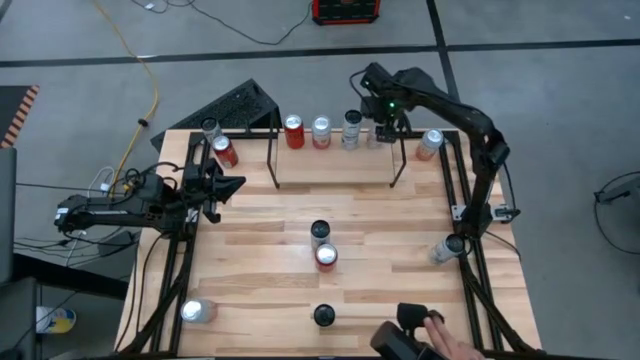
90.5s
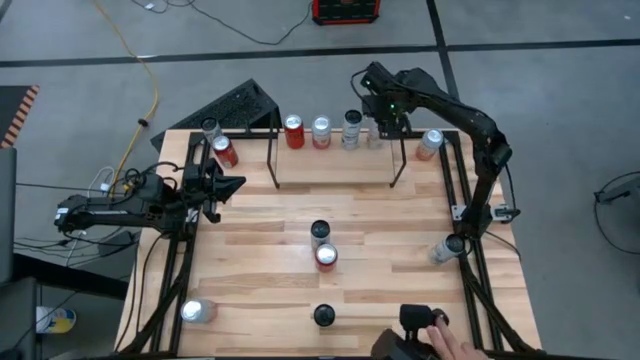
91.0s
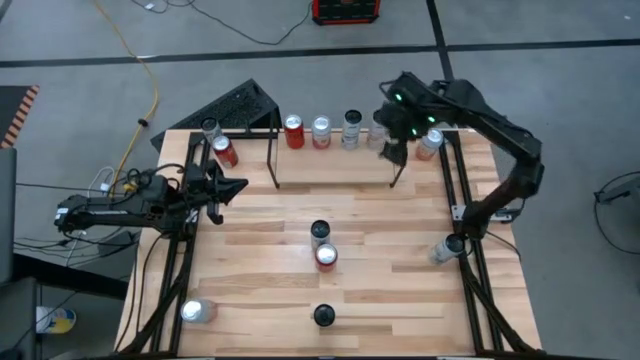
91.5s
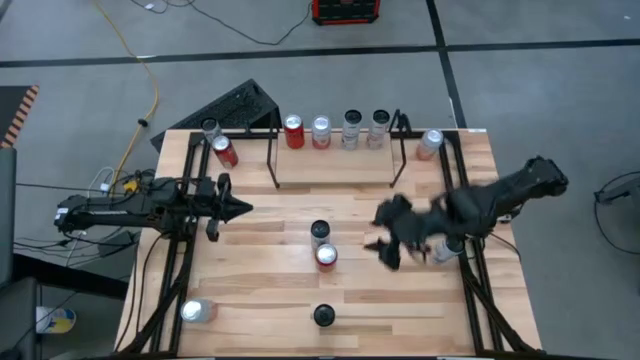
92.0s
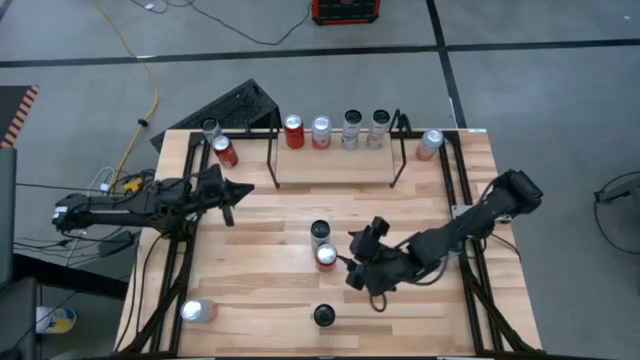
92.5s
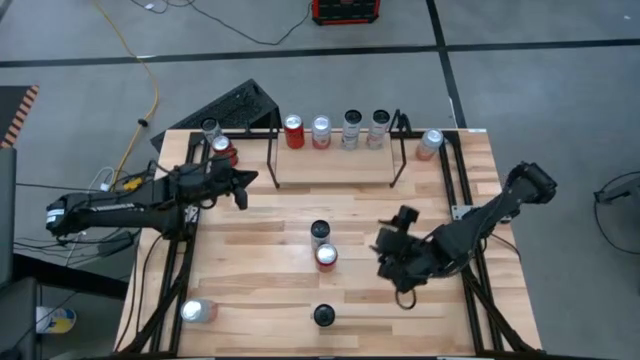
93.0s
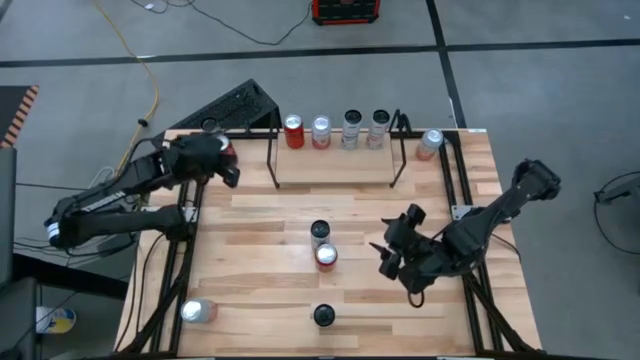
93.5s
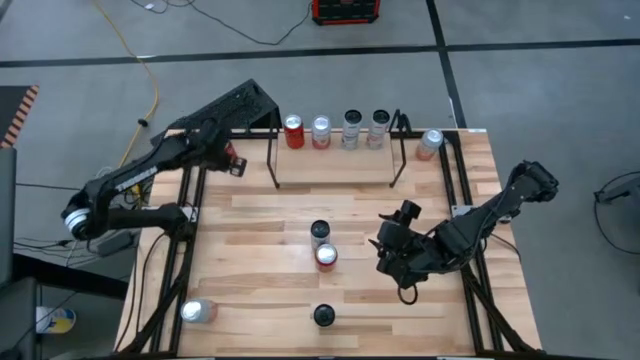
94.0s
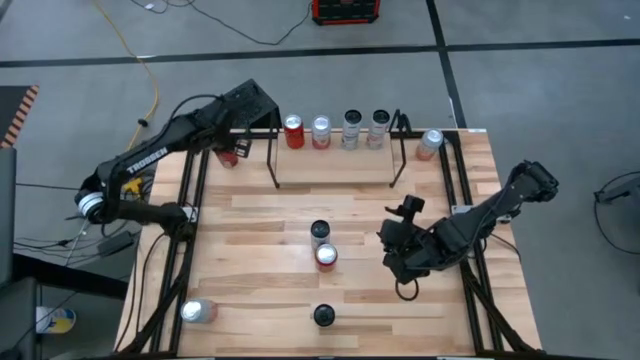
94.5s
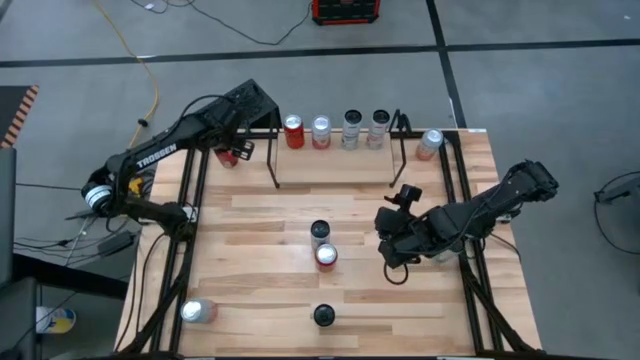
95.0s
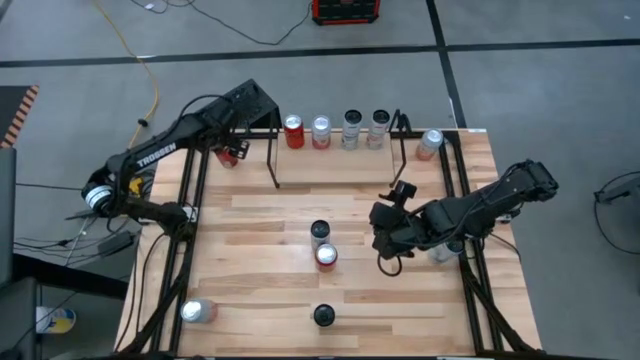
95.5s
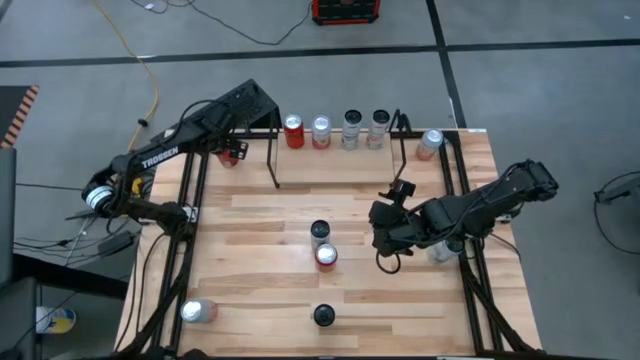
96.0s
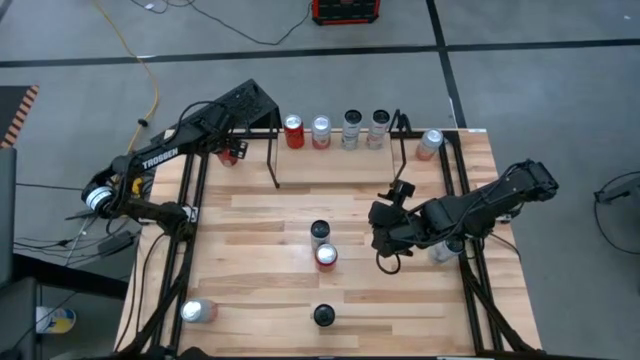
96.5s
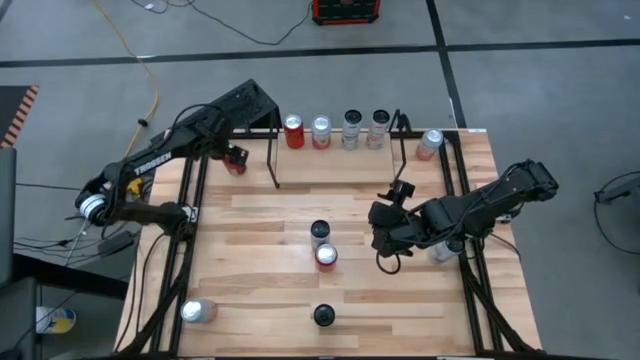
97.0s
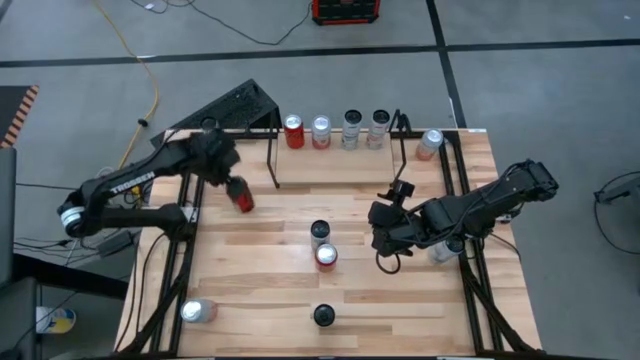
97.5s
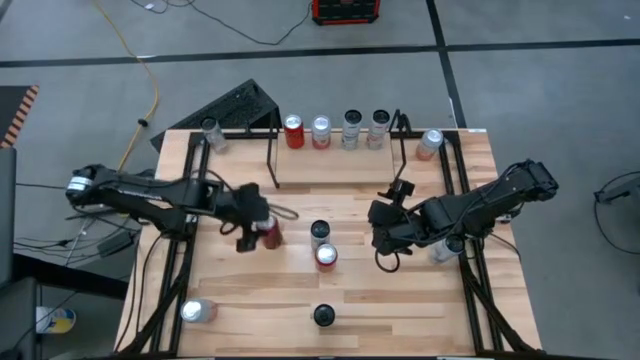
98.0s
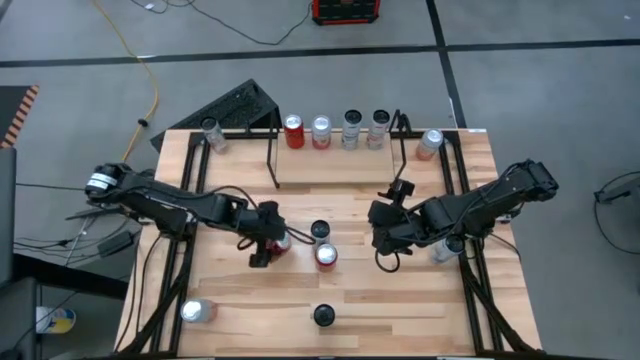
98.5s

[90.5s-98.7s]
Task: Place canned beverage on shelf
Put the top red black soda can on the shelf aligned with the other red black soda can

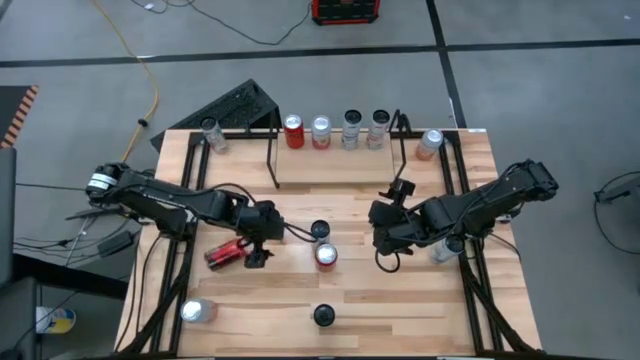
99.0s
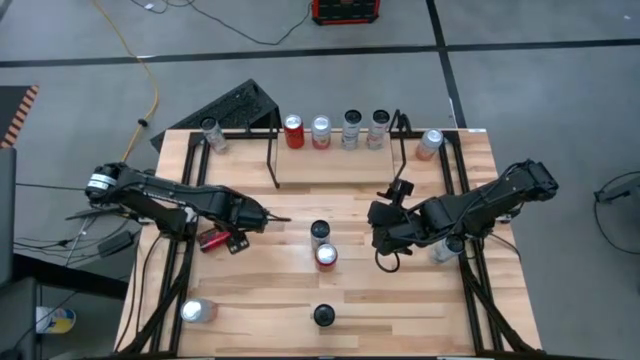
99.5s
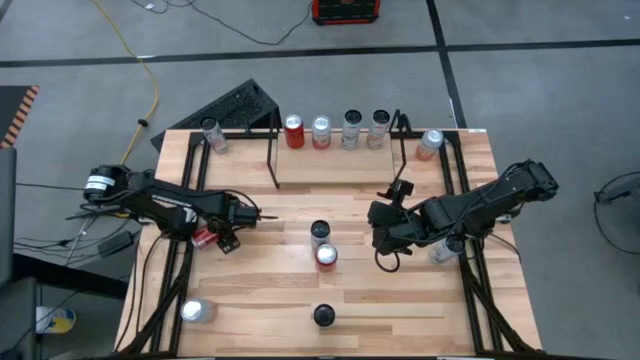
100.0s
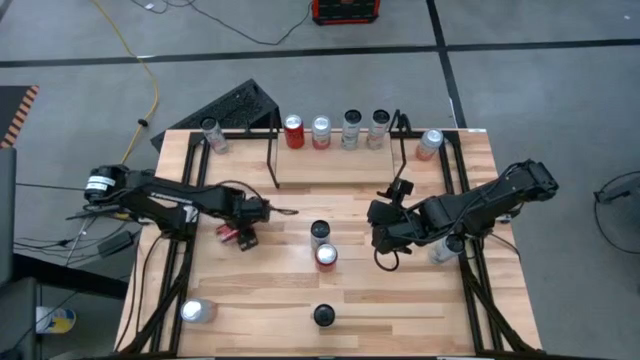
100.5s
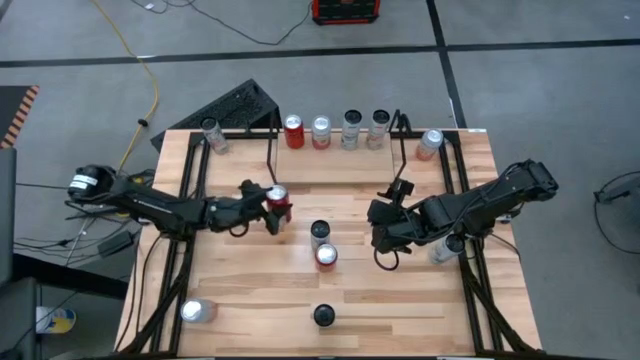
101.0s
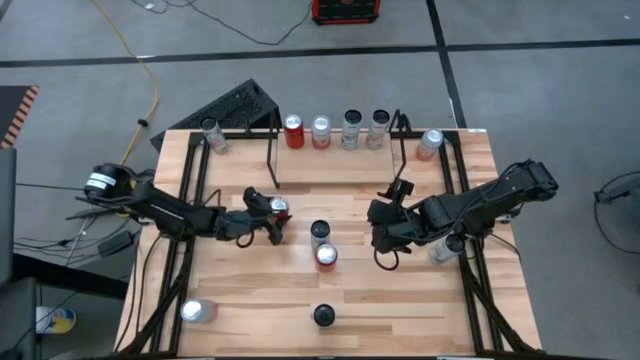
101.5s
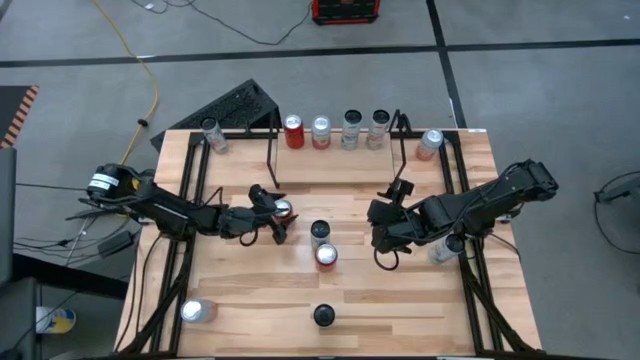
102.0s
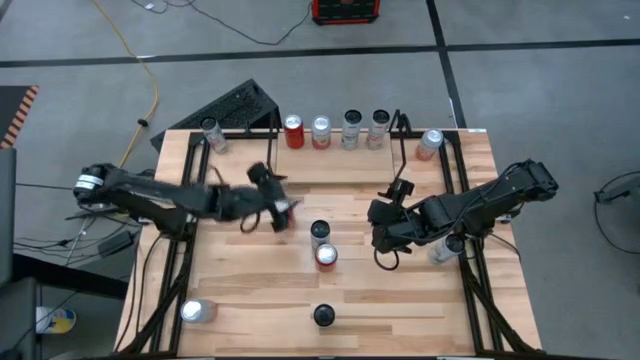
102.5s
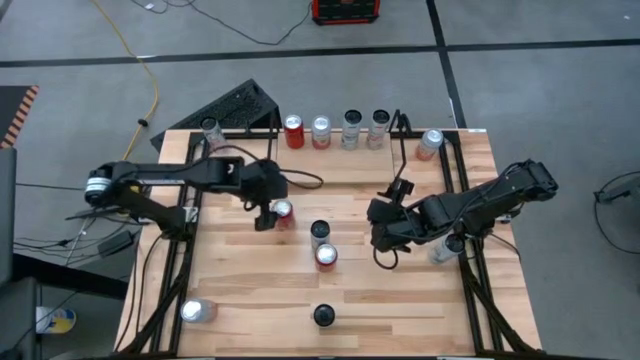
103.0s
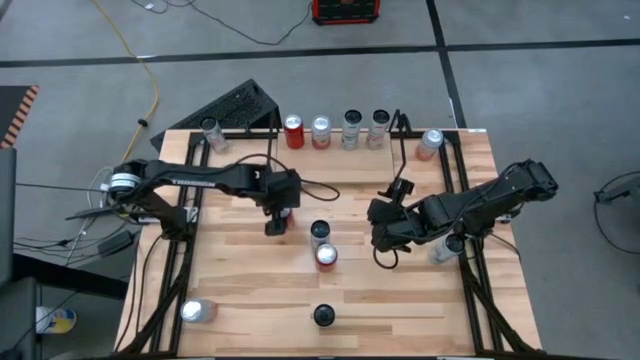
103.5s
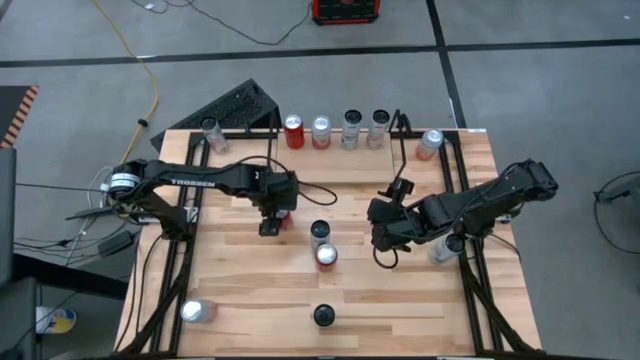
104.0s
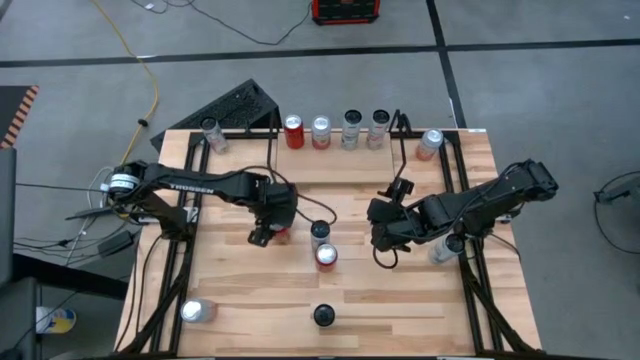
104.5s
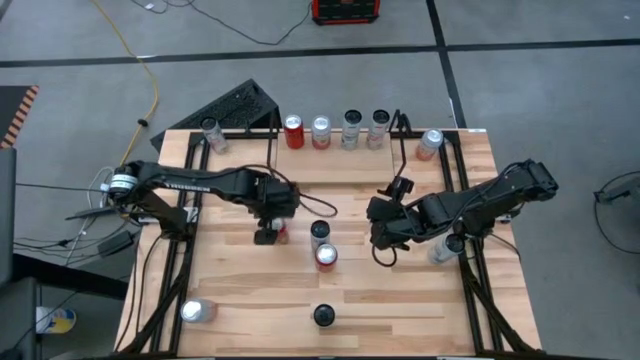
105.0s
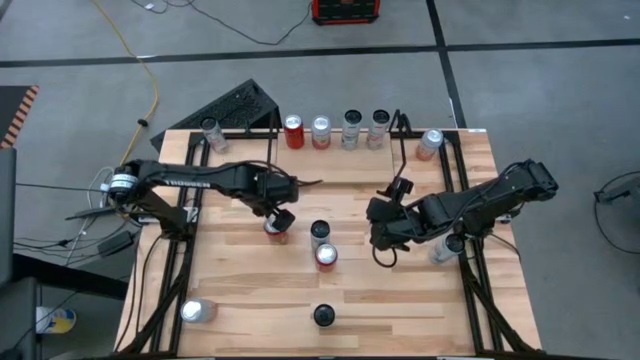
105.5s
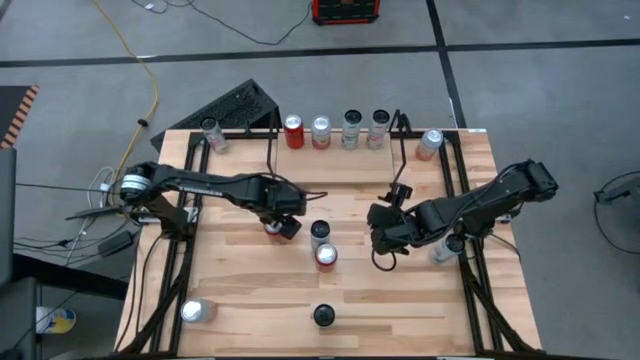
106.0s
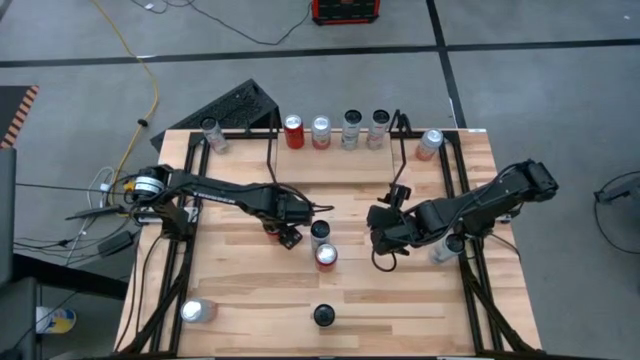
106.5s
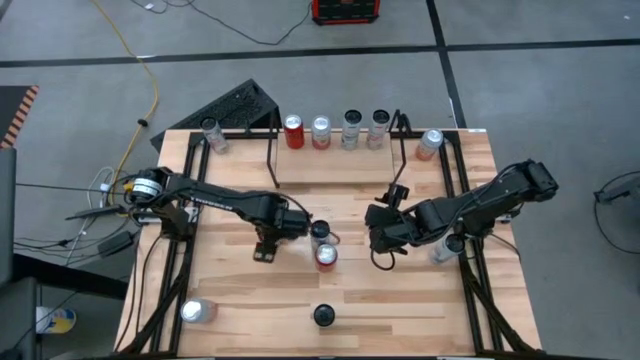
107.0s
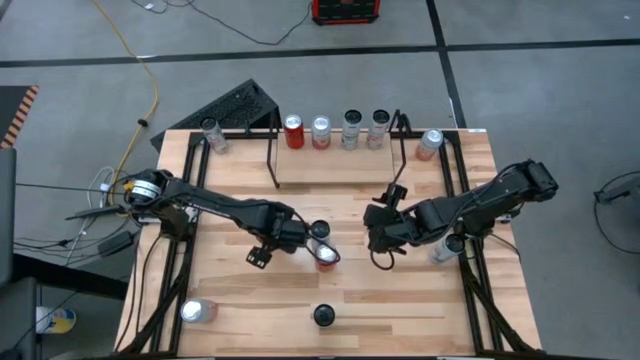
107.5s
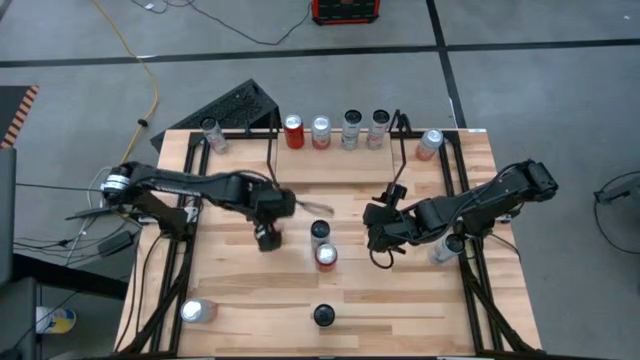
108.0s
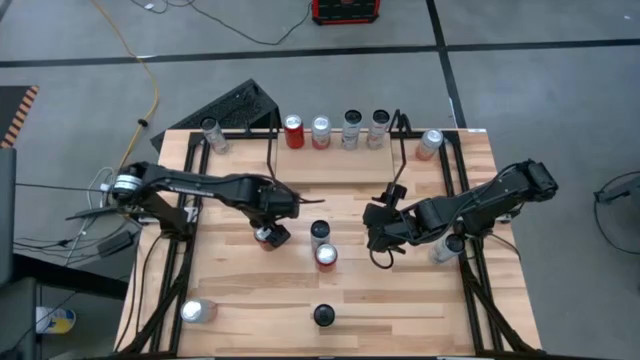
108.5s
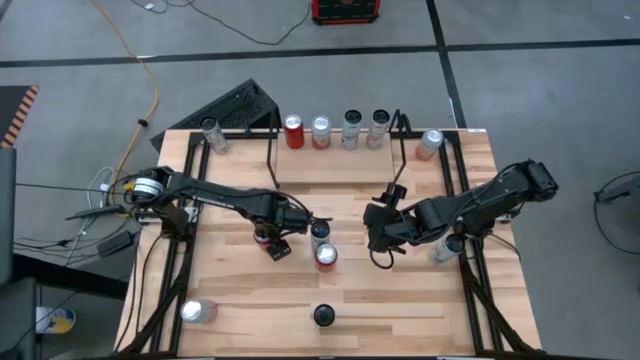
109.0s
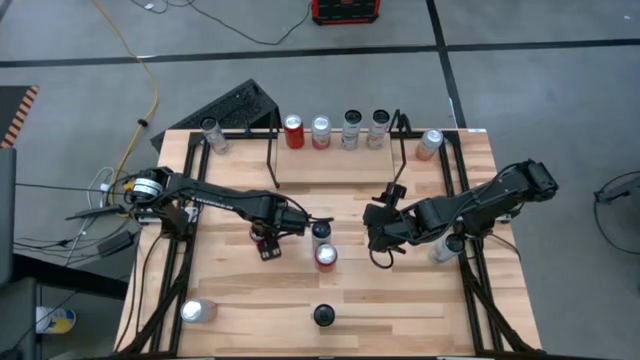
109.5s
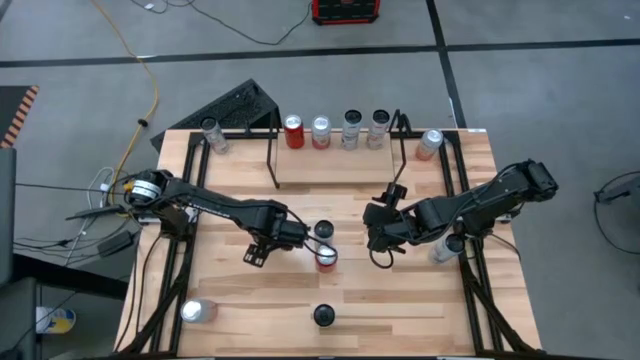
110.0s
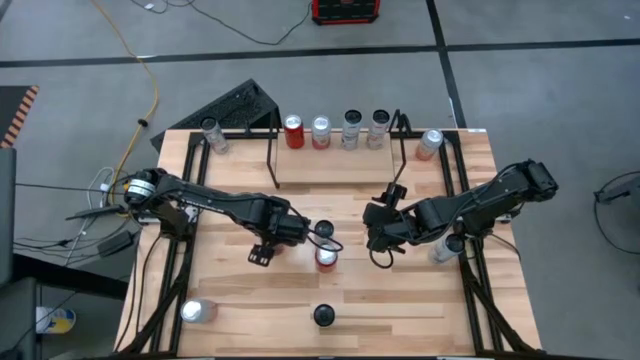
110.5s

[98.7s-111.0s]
Put the top red black soda can on the shelf aligned with the other red black soda can
